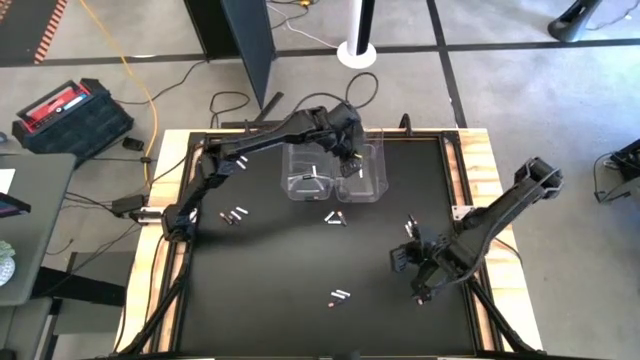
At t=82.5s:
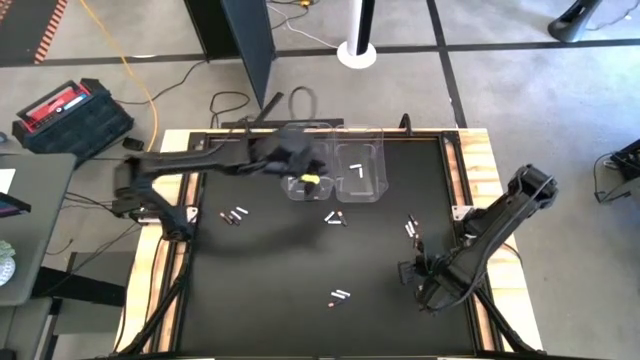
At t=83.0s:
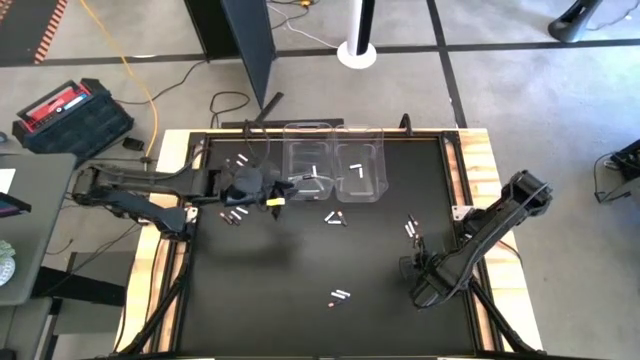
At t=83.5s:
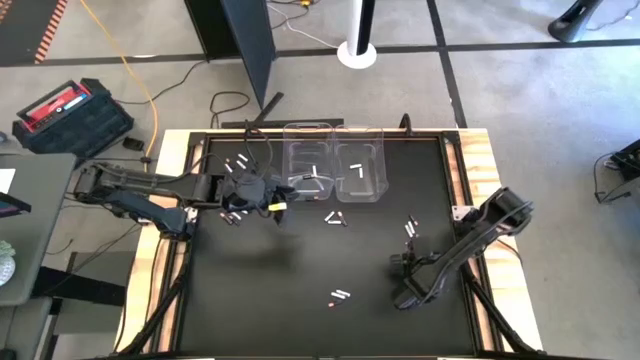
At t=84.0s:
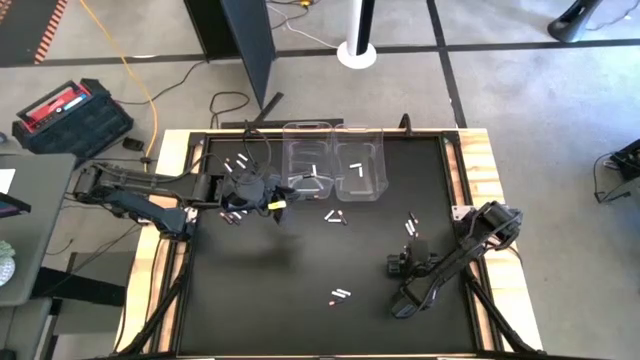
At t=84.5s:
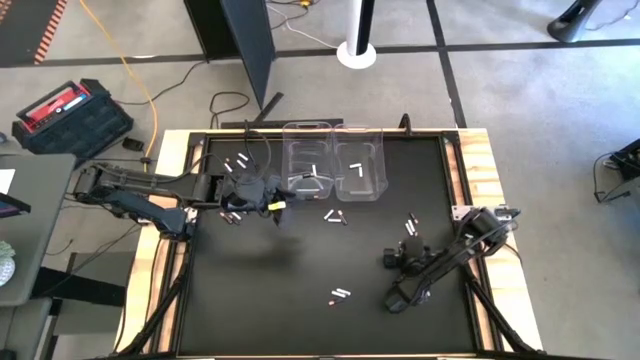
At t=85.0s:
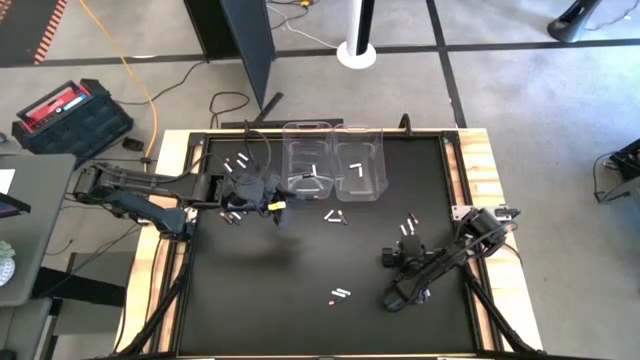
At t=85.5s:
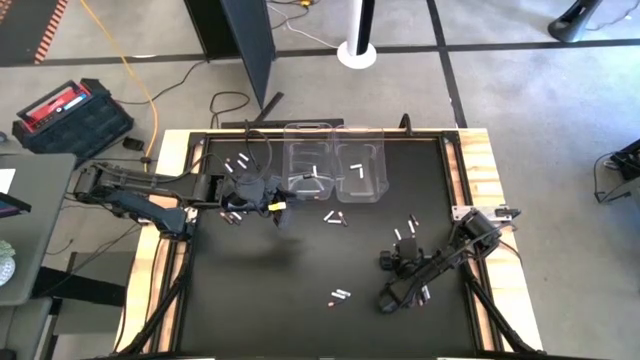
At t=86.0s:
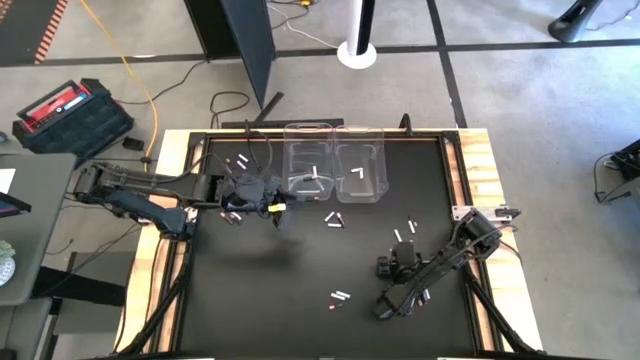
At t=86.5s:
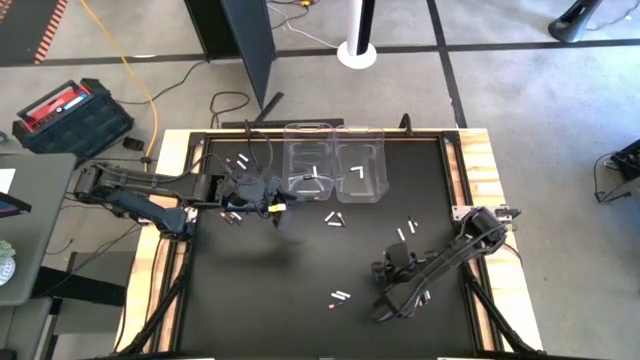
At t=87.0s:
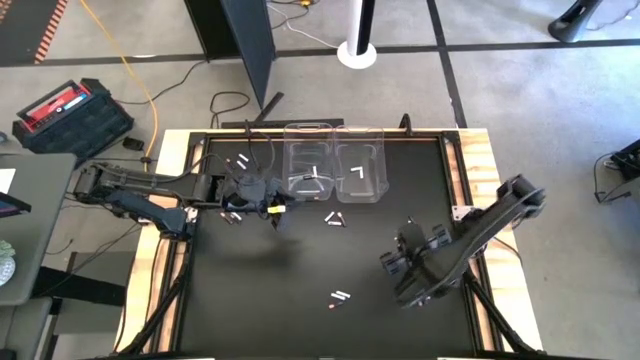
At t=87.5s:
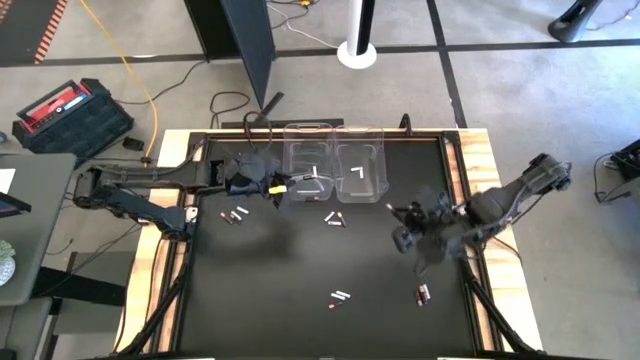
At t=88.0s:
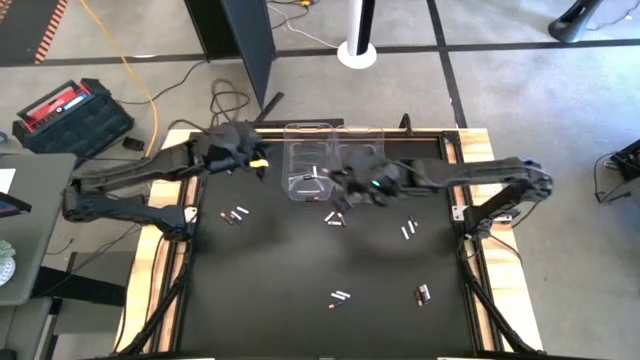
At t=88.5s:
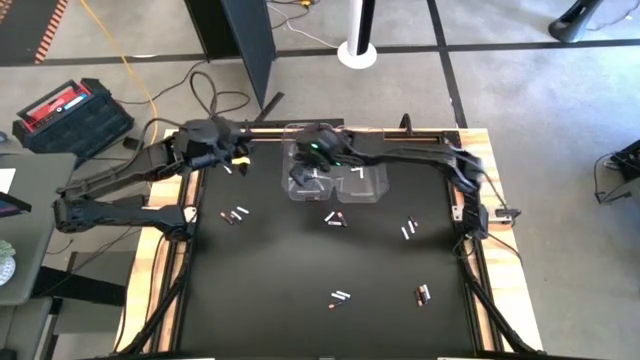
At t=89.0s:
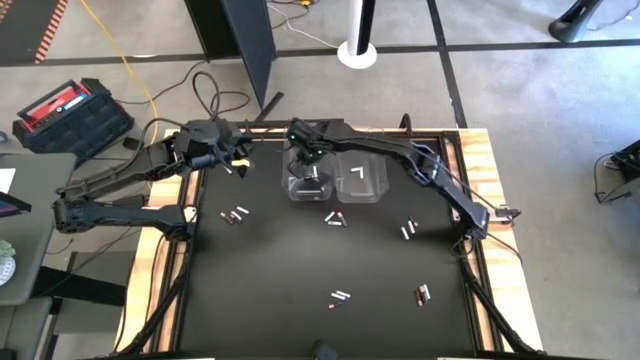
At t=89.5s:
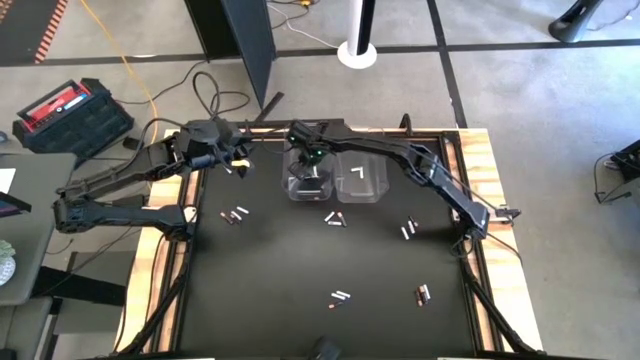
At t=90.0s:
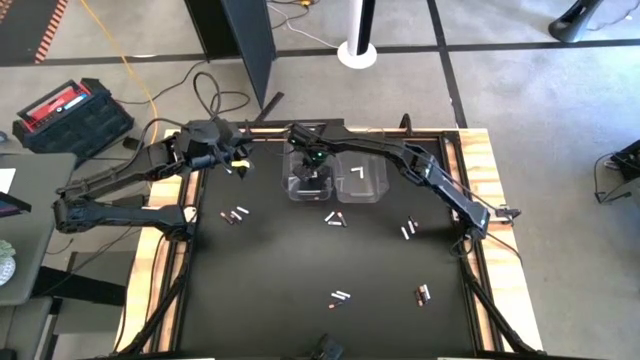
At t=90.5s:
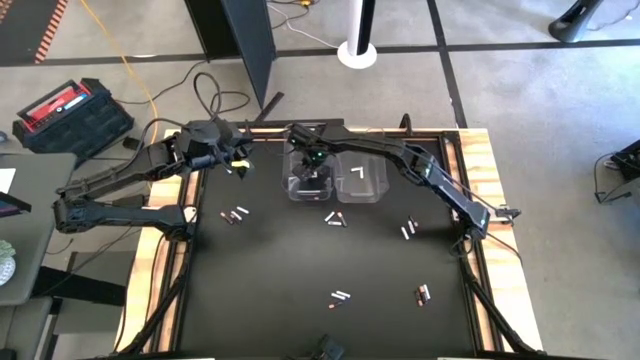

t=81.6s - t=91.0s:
Task: Sort batteries
Put the black battery into the left transparent bin

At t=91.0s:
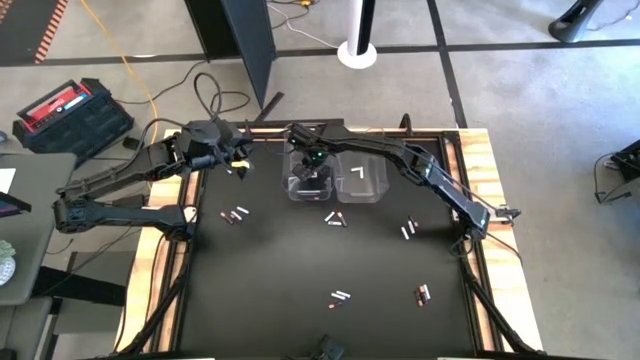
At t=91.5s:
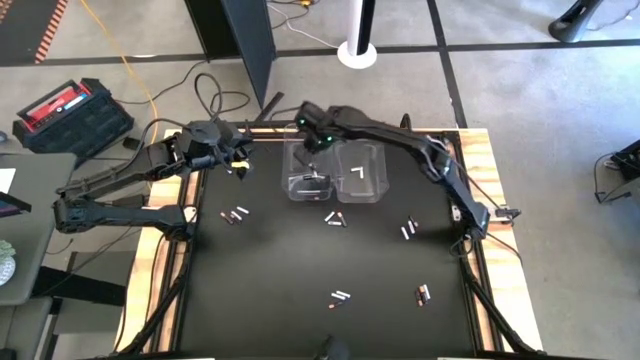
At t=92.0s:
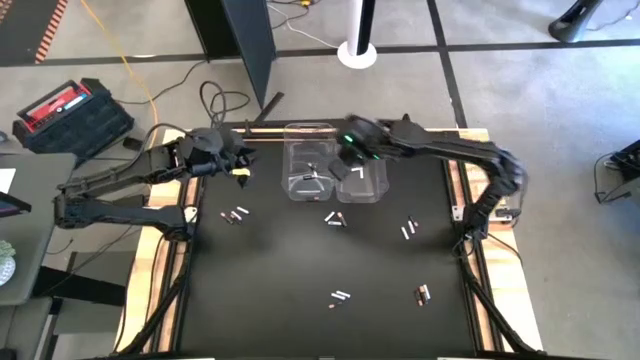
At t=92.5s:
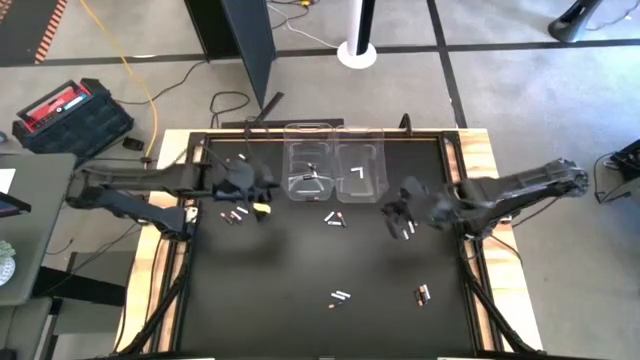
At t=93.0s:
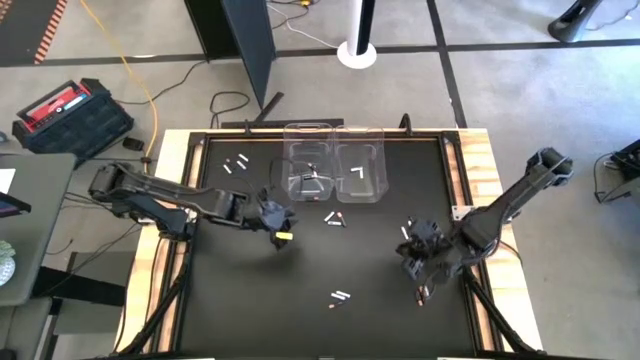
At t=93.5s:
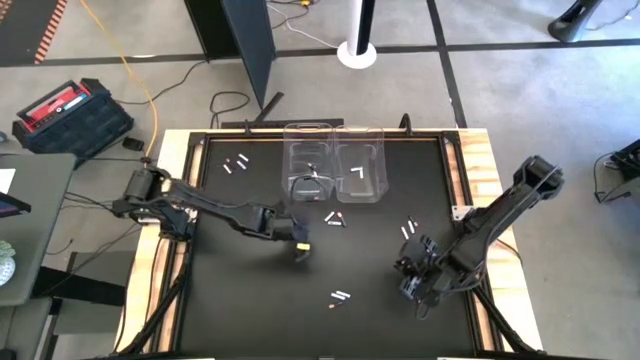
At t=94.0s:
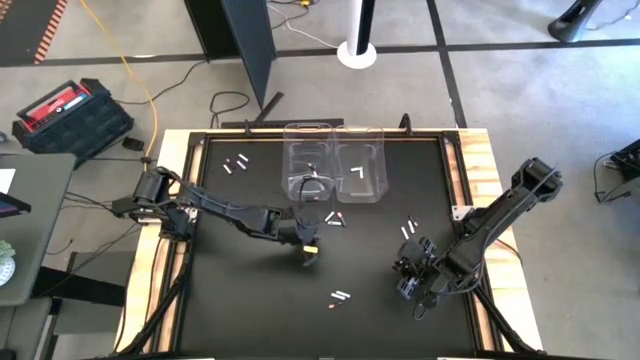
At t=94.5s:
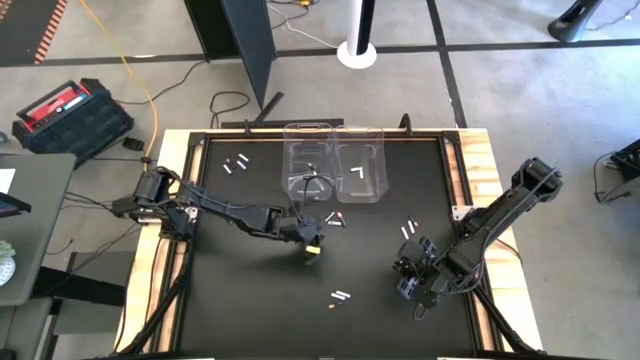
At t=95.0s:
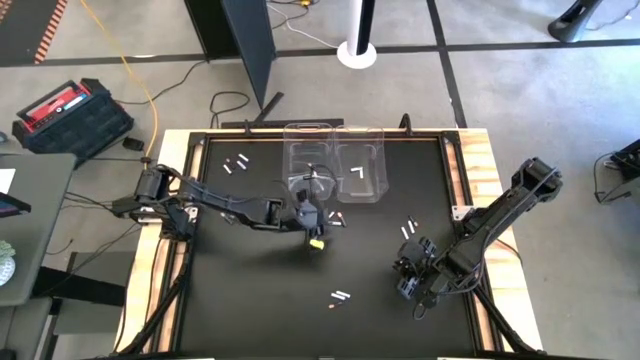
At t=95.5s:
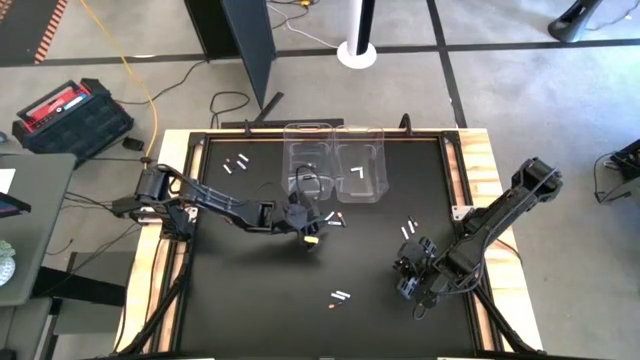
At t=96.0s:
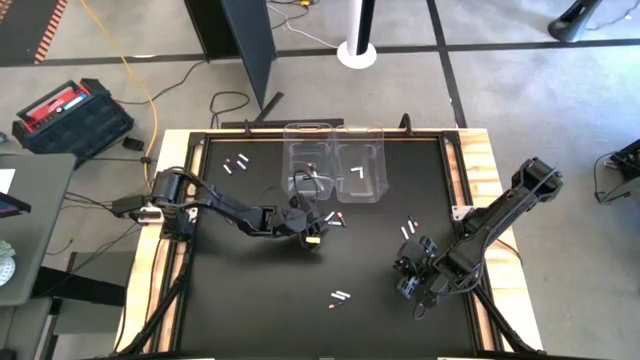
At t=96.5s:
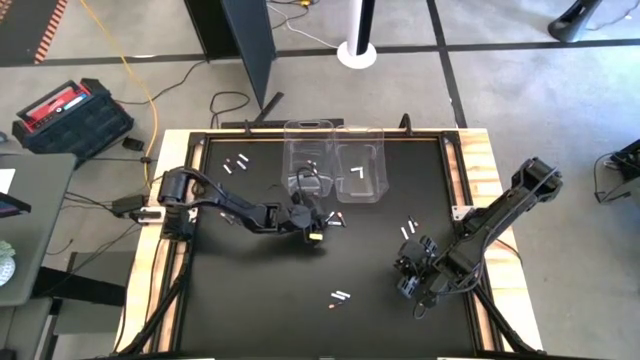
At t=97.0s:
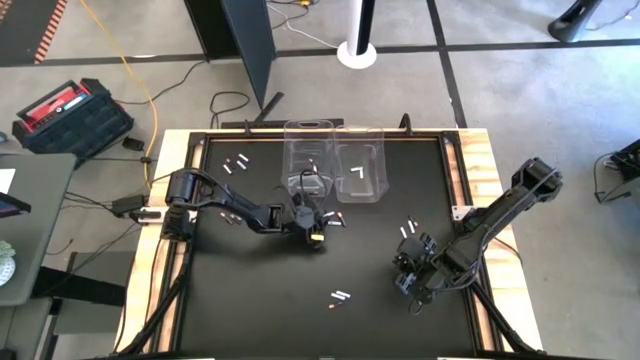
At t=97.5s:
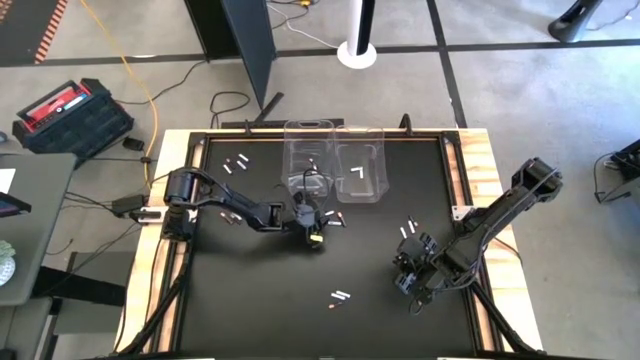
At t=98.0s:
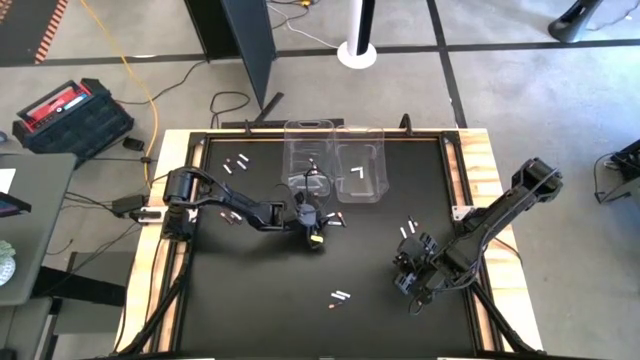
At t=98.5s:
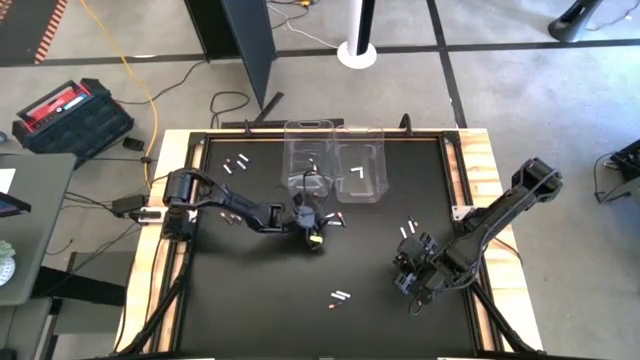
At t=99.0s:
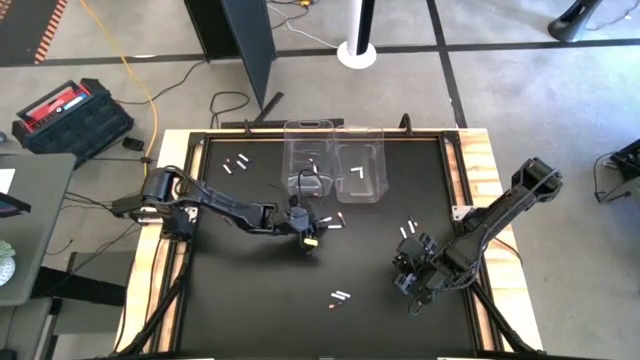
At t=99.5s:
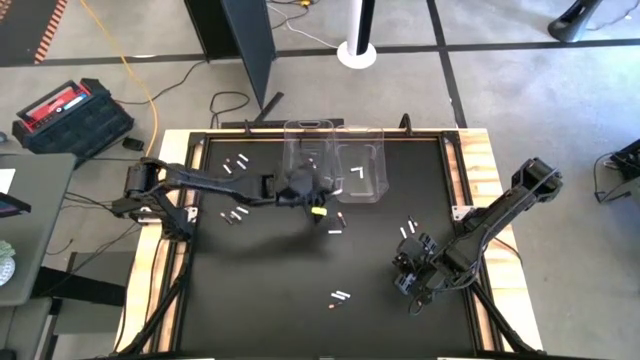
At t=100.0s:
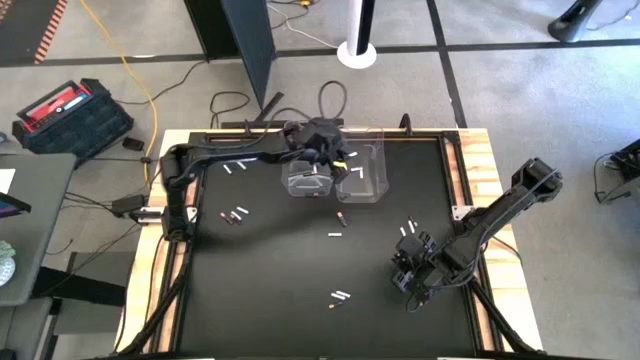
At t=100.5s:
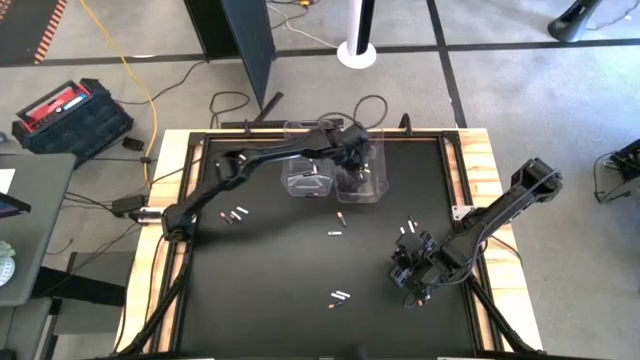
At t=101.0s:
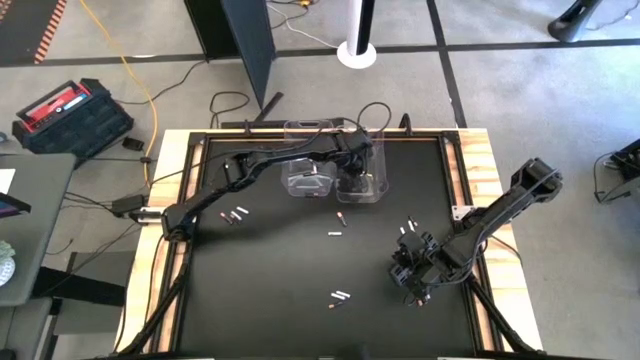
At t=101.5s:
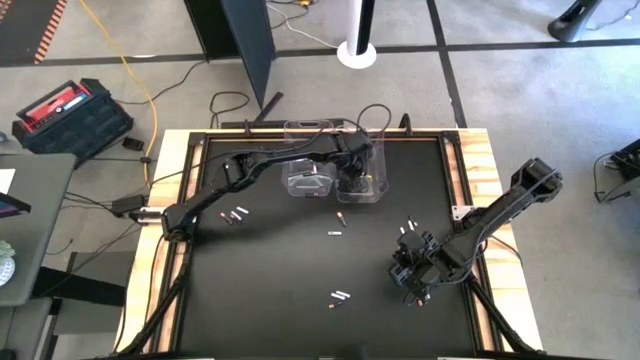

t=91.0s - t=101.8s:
Put the white battery into the right transparent bin

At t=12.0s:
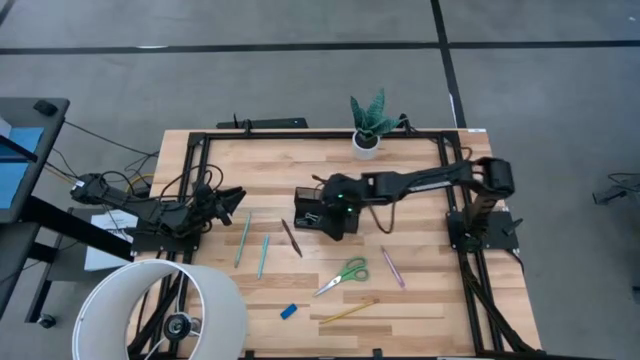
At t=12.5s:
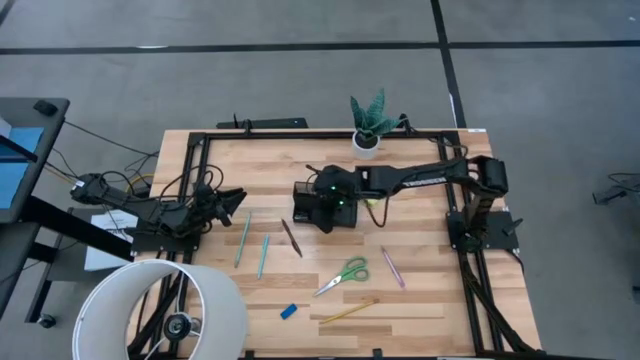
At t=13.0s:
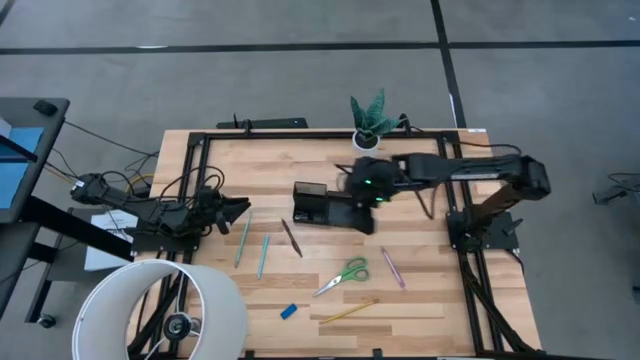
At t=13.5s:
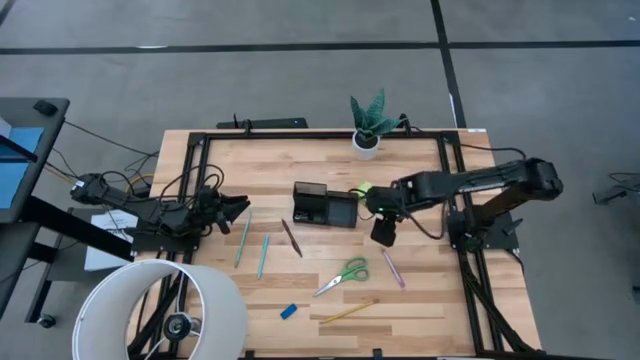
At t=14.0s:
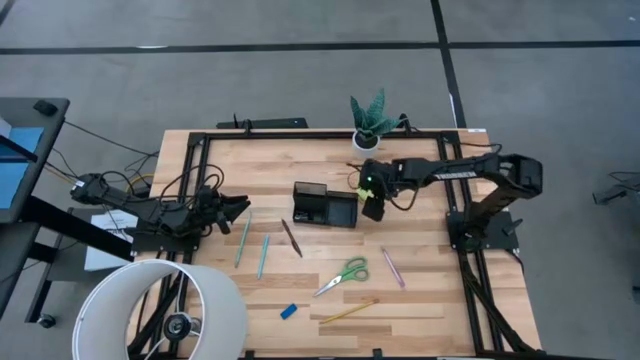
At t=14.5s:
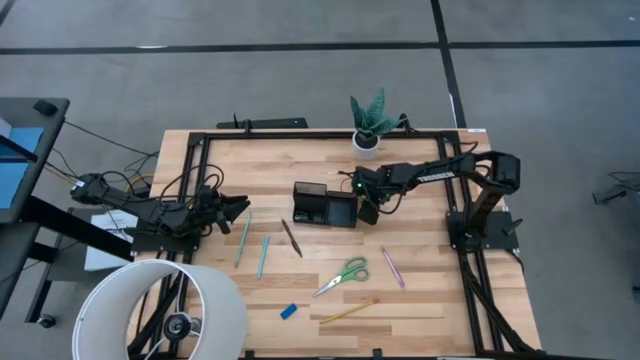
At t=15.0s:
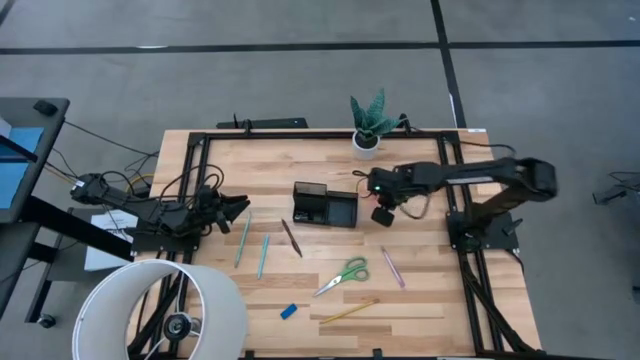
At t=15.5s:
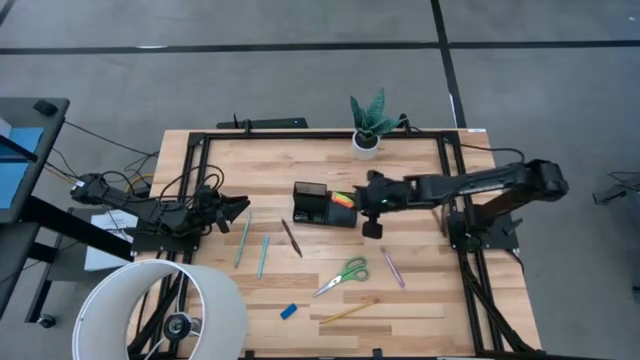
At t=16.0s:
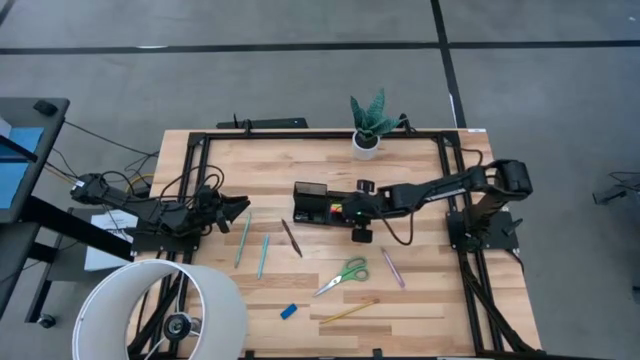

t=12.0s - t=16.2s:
Task: Pick and place office supplies into organizer
Put the green sticky notes into the black desk organizer
